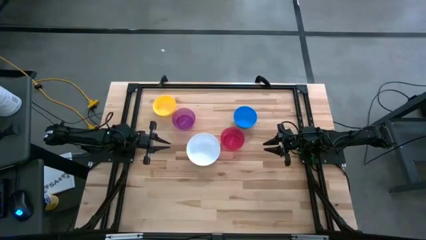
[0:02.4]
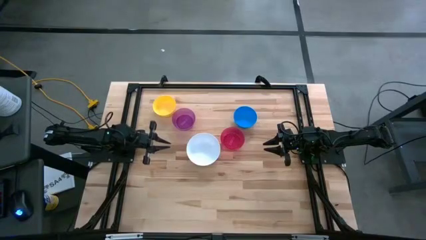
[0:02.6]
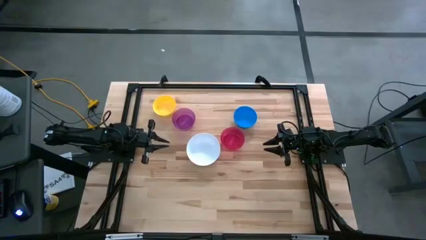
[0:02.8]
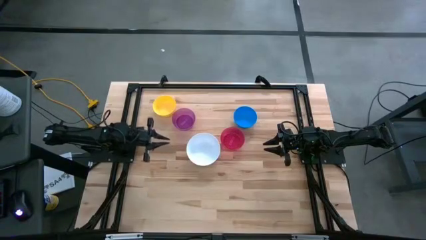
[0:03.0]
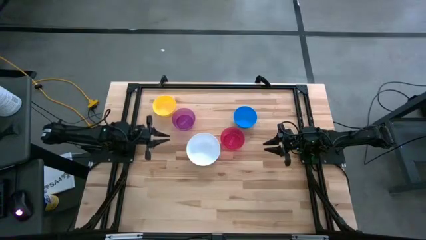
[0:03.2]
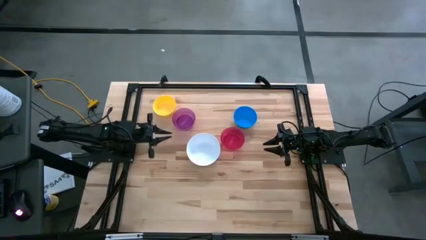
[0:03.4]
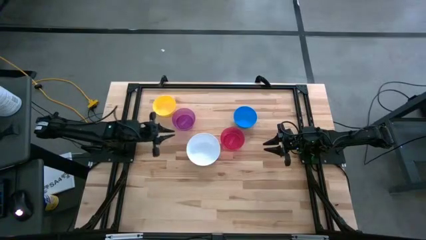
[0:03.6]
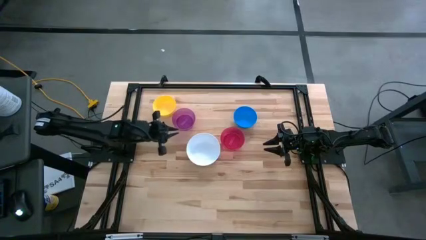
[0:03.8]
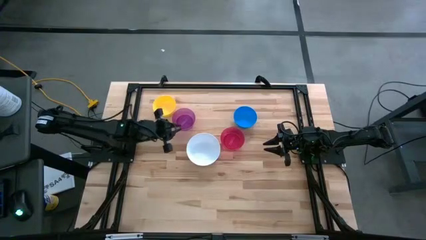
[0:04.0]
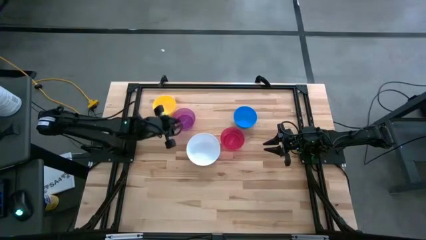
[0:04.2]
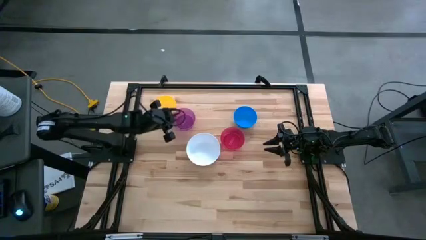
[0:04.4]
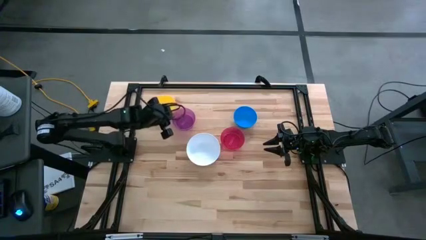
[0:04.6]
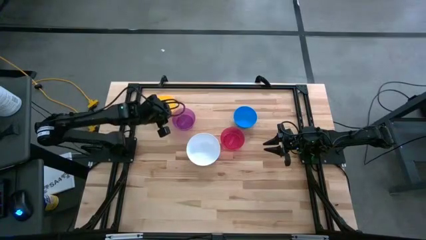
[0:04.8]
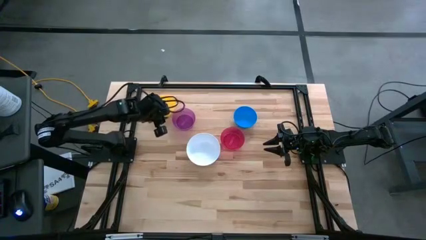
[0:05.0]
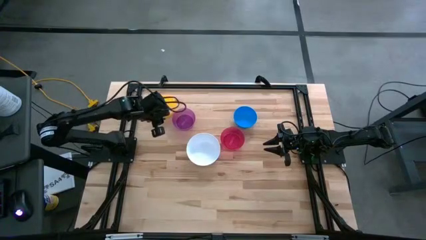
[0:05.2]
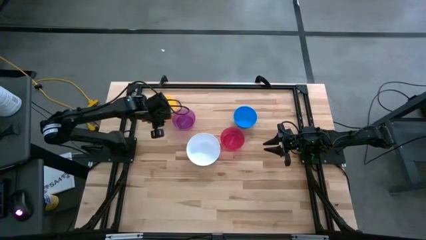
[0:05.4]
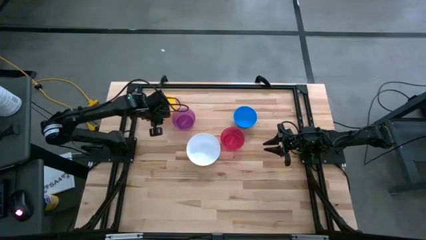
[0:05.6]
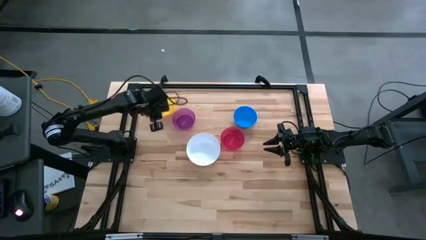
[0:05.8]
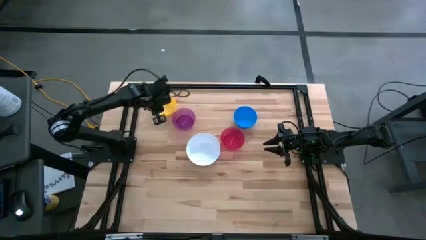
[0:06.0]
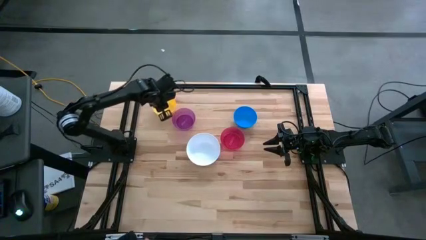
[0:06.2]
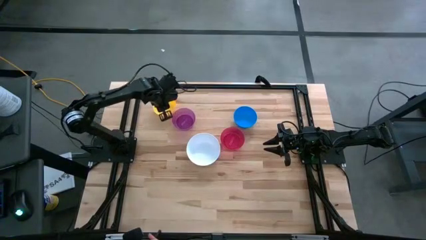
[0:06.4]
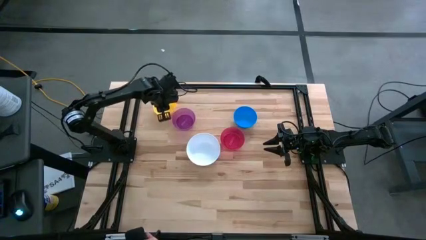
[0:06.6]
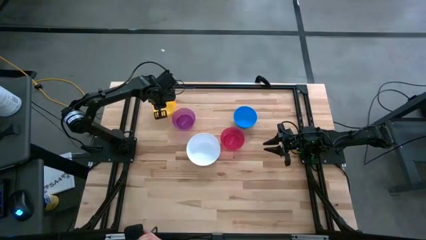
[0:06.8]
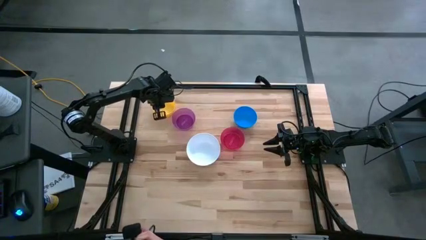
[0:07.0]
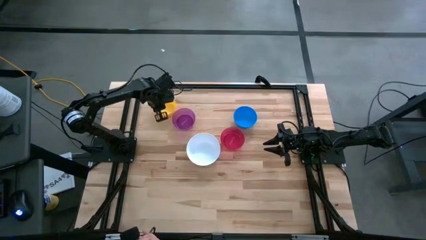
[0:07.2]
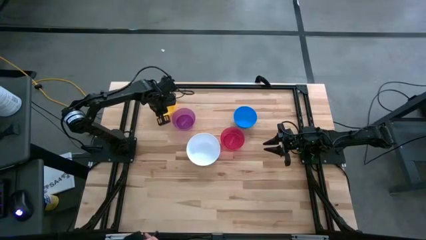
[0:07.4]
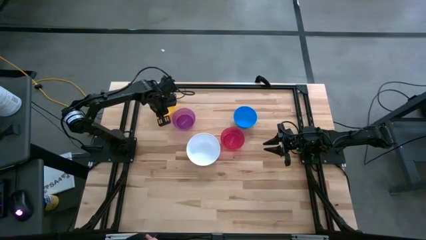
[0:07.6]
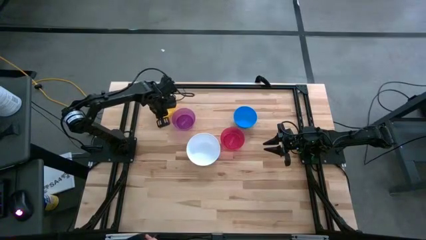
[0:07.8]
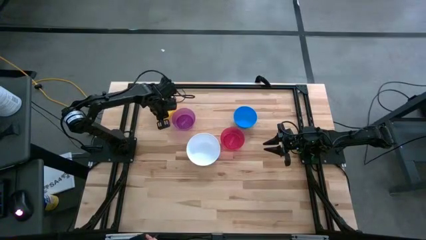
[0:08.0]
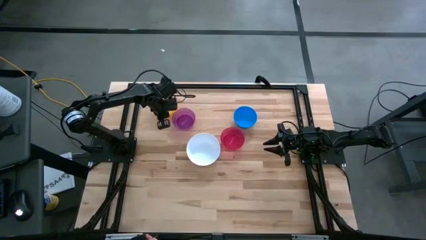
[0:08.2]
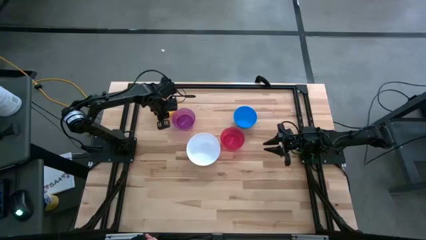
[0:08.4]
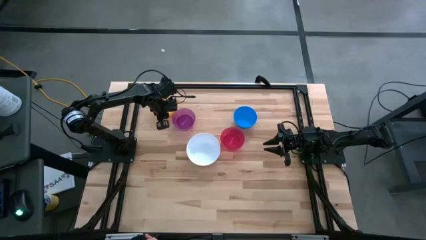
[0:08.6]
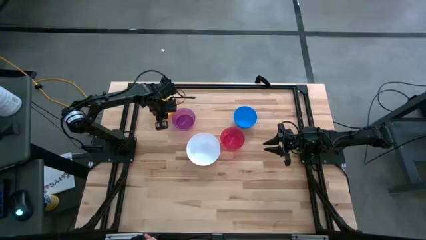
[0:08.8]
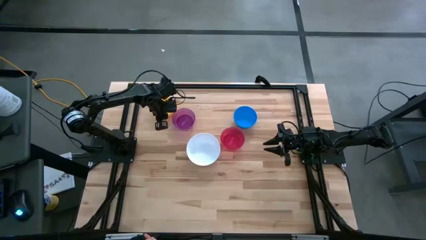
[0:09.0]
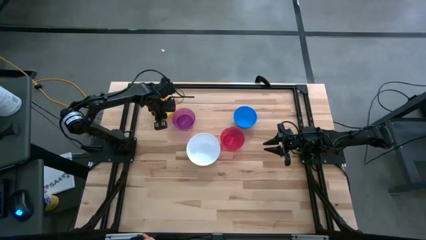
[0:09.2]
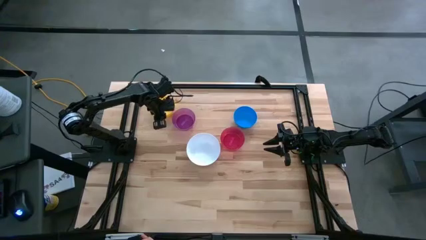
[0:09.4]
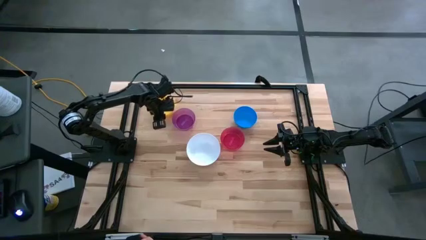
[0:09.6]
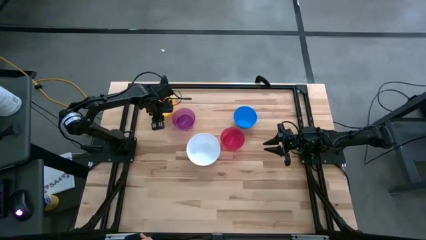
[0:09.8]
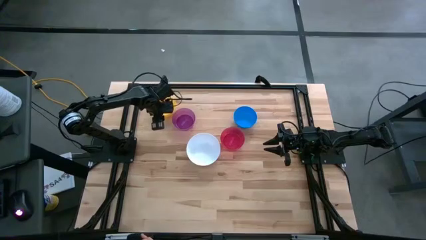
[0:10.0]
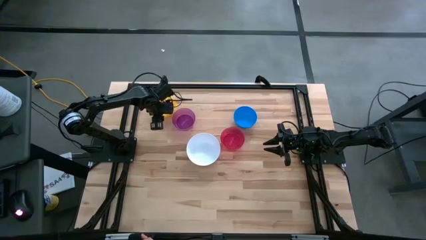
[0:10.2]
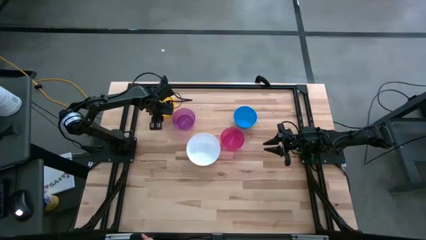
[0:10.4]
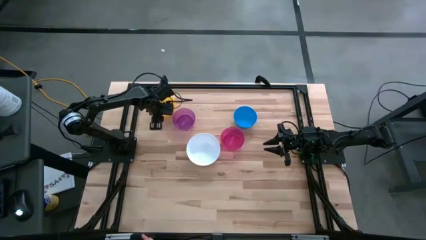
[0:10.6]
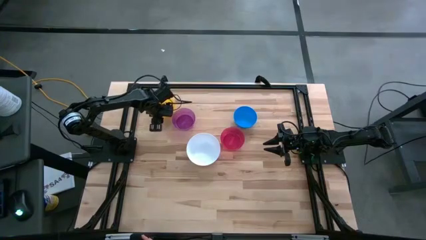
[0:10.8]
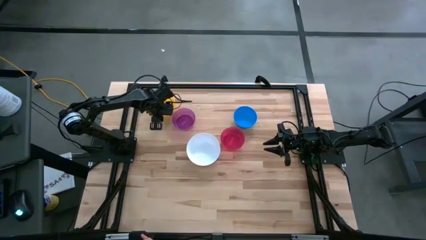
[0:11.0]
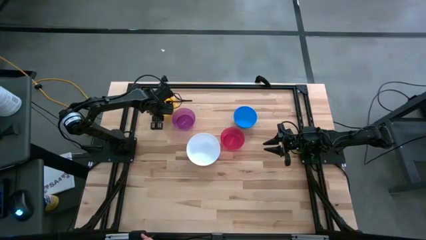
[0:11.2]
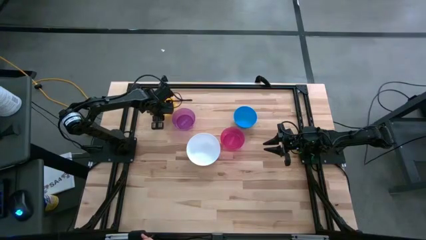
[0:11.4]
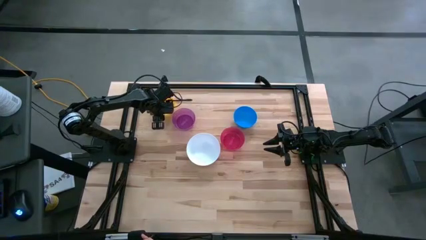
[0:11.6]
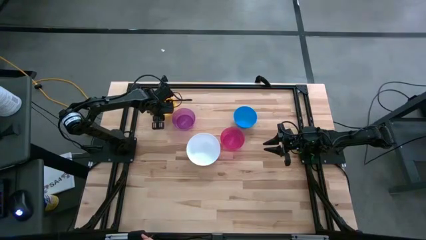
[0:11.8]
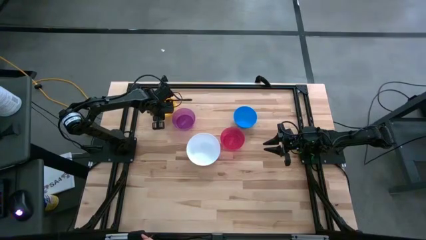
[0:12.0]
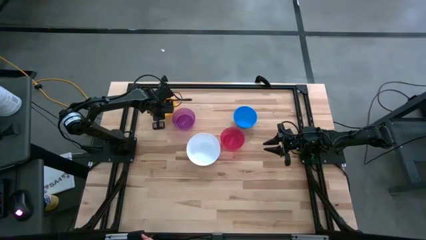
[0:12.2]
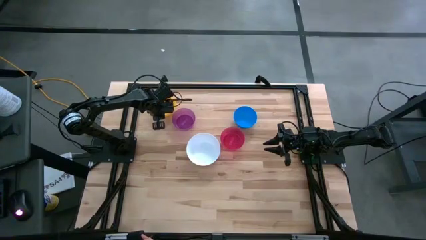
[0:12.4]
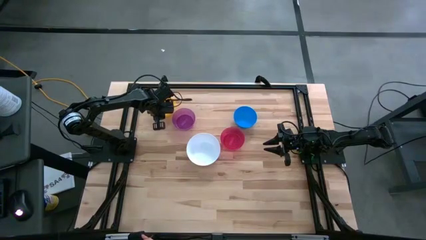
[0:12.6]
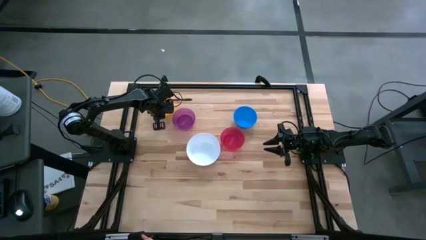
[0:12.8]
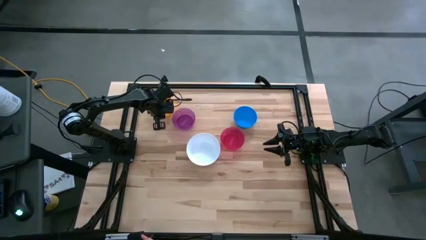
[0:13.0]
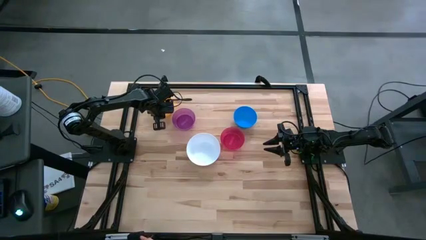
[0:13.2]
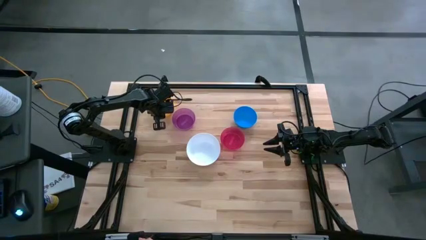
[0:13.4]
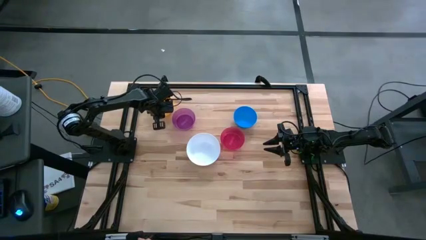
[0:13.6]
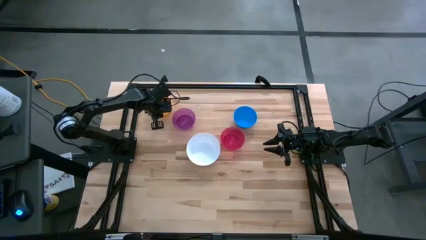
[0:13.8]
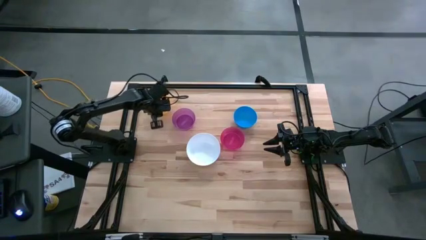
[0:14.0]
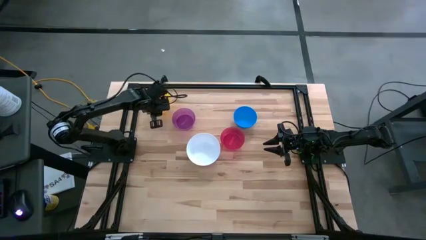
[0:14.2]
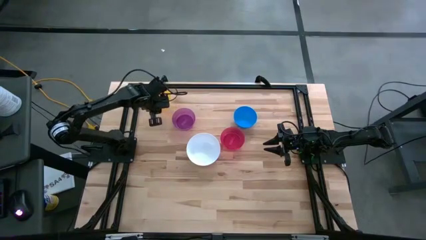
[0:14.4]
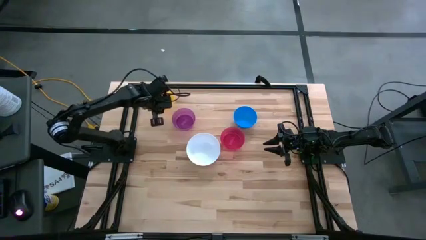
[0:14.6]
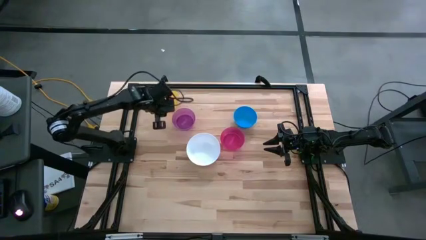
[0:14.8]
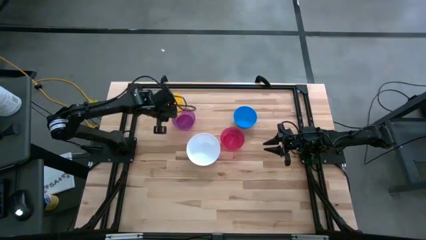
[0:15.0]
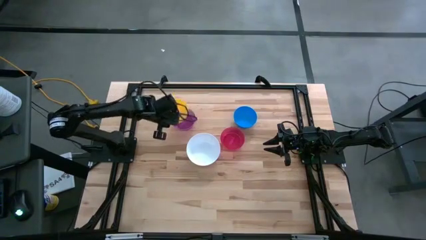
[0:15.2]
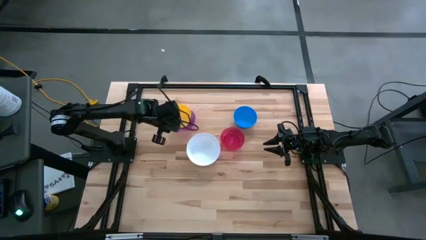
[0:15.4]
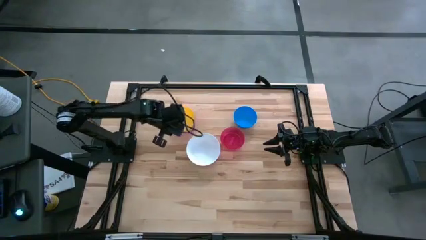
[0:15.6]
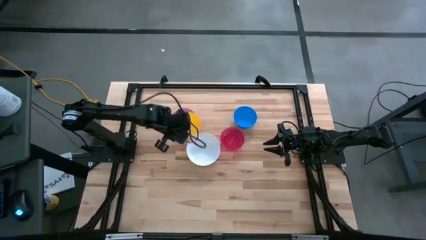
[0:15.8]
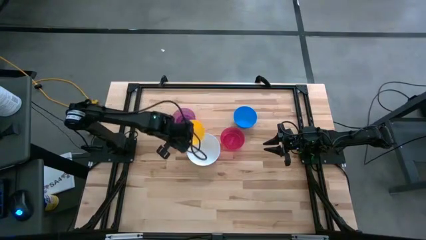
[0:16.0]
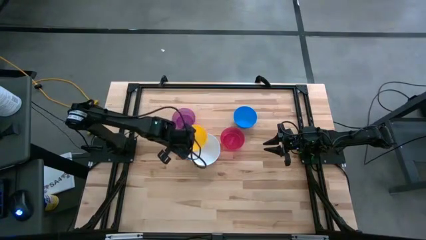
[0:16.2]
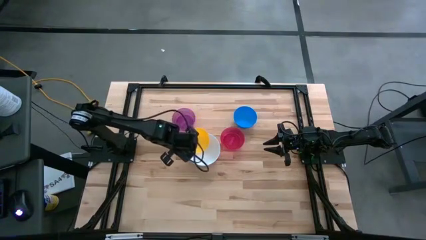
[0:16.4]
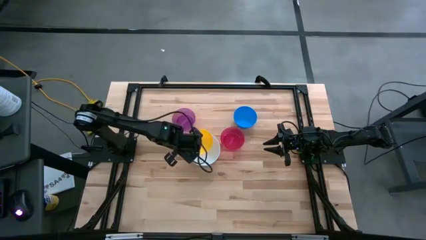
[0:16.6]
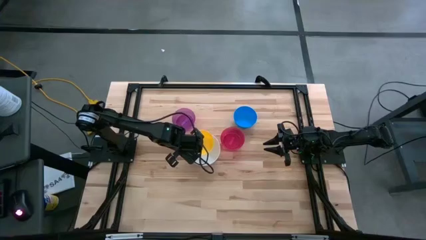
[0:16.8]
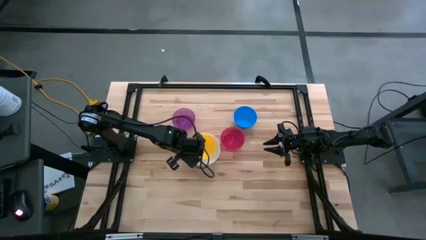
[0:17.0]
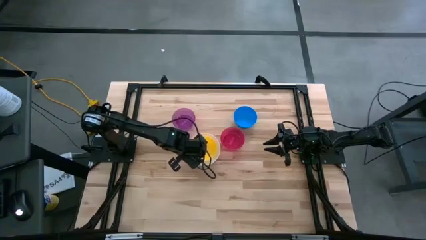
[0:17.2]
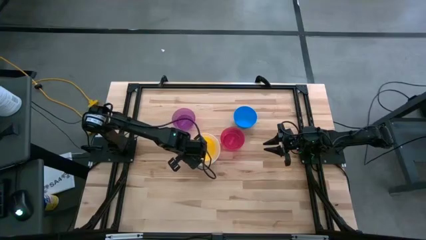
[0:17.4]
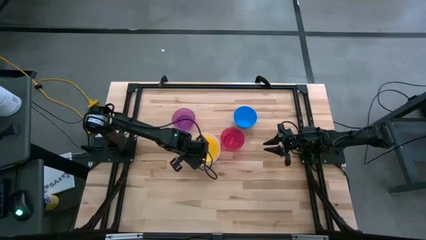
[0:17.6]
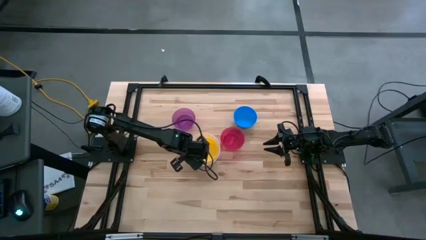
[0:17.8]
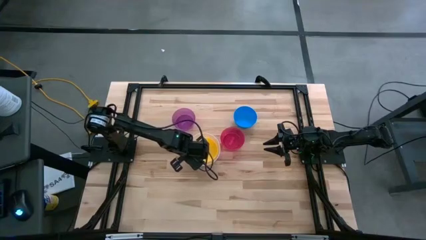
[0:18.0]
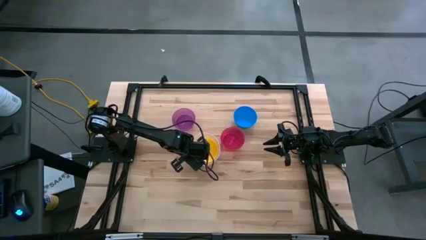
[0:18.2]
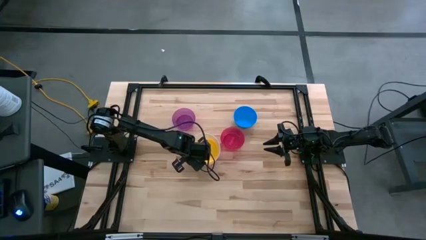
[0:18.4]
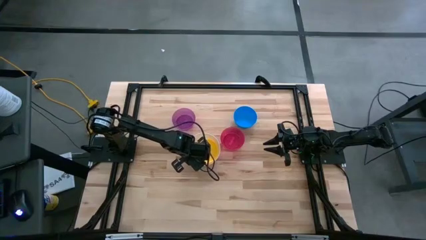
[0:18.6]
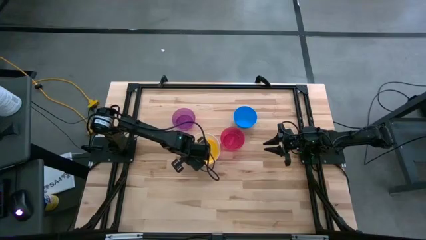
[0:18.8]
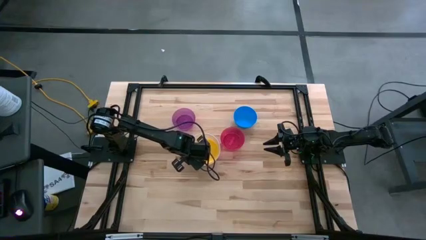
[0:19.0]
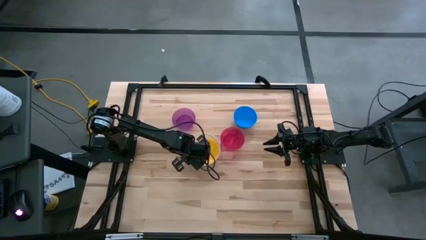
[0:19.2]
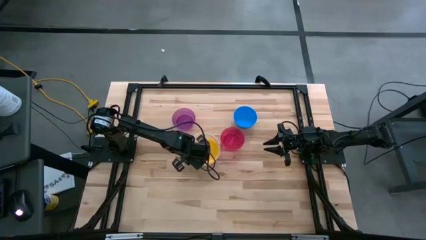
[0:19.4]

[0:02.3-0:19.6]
Stack the yellow bowl on top of the white bowl
